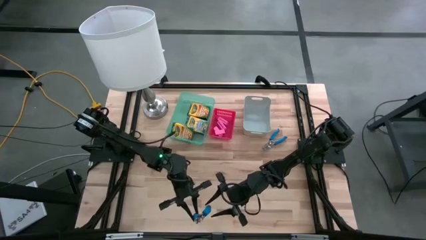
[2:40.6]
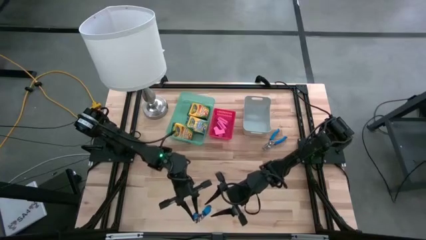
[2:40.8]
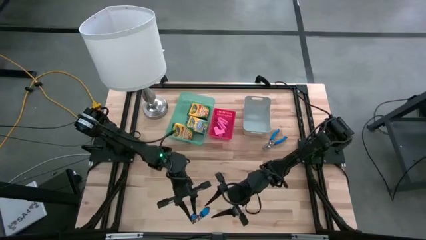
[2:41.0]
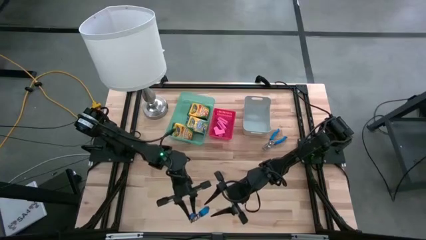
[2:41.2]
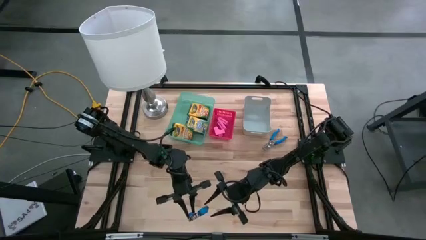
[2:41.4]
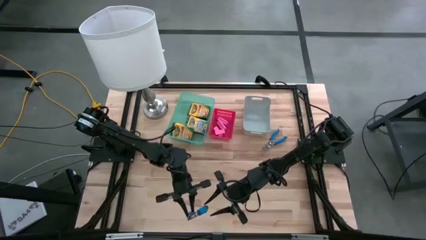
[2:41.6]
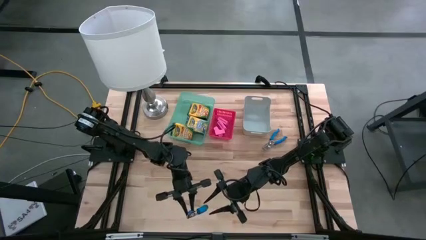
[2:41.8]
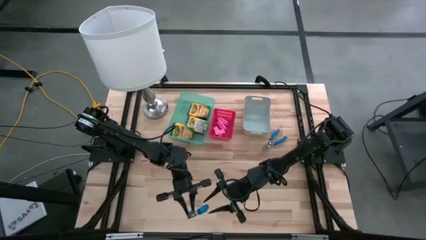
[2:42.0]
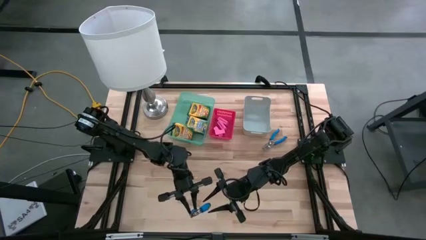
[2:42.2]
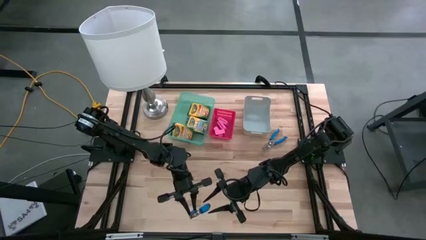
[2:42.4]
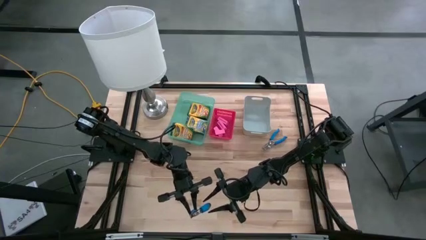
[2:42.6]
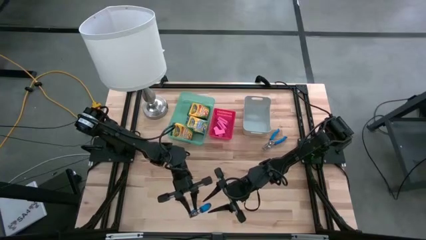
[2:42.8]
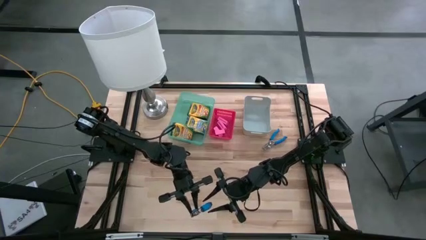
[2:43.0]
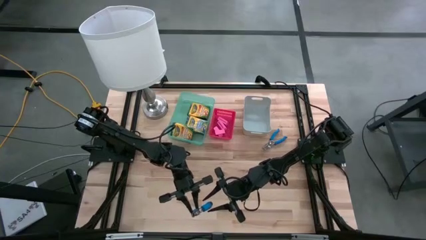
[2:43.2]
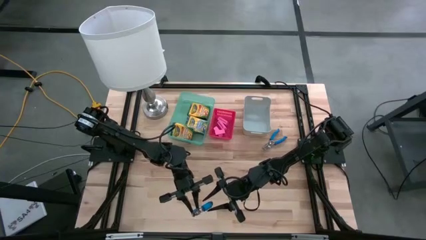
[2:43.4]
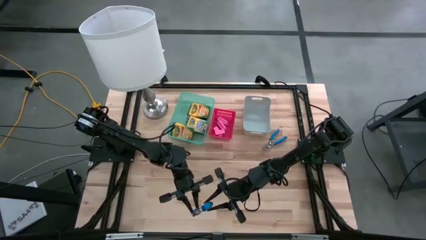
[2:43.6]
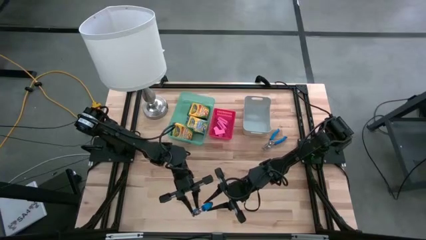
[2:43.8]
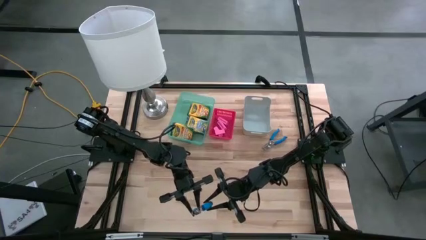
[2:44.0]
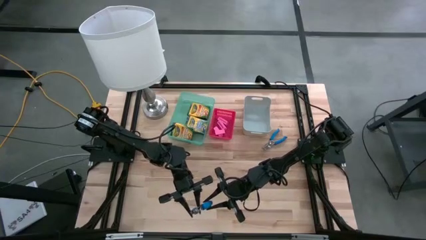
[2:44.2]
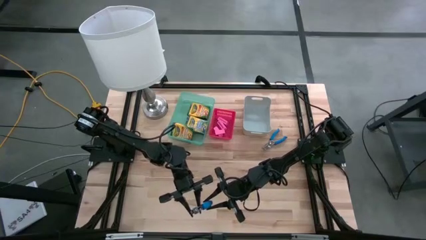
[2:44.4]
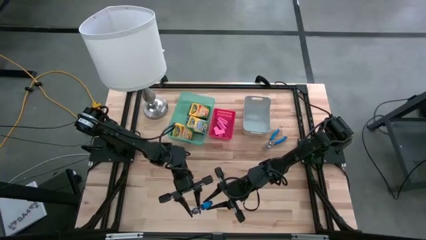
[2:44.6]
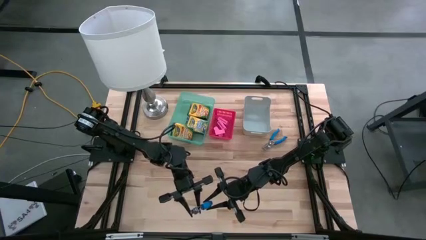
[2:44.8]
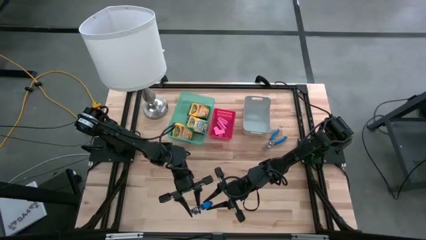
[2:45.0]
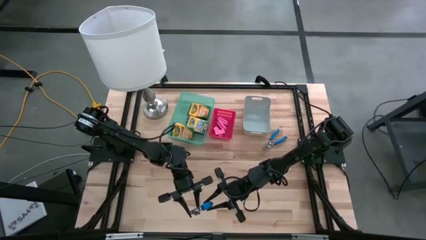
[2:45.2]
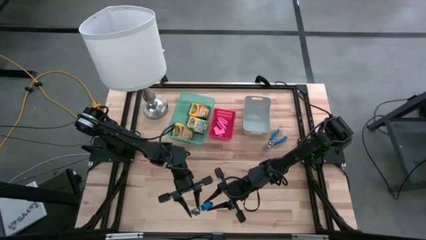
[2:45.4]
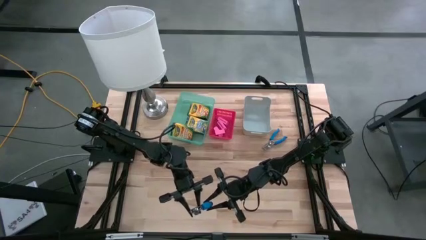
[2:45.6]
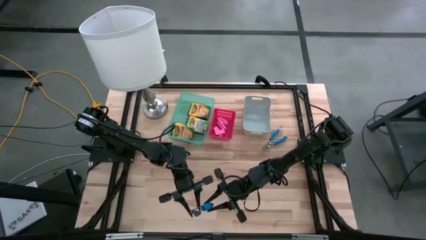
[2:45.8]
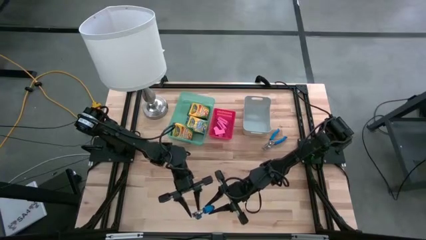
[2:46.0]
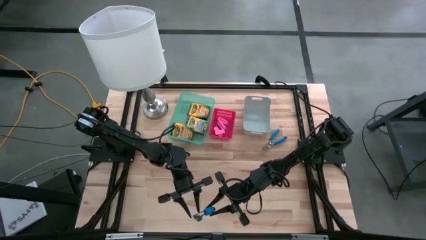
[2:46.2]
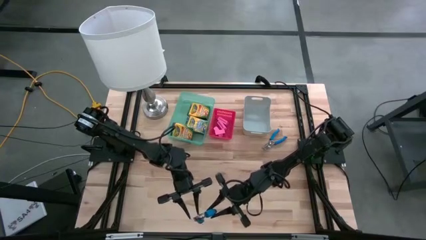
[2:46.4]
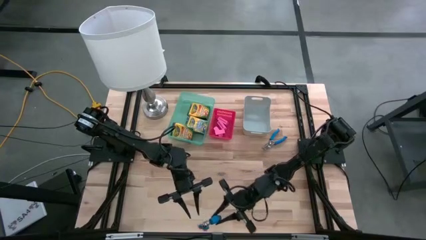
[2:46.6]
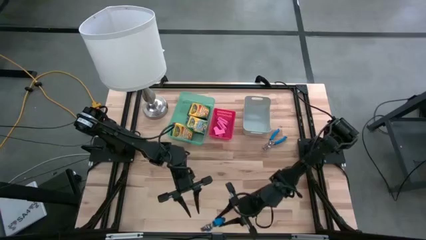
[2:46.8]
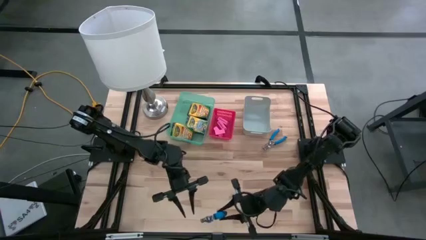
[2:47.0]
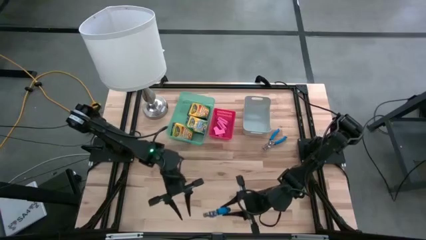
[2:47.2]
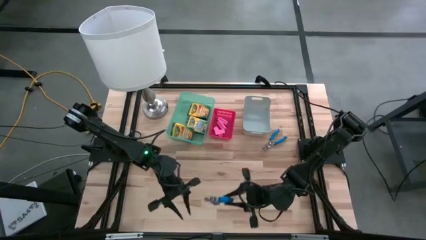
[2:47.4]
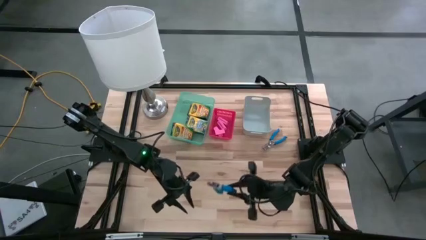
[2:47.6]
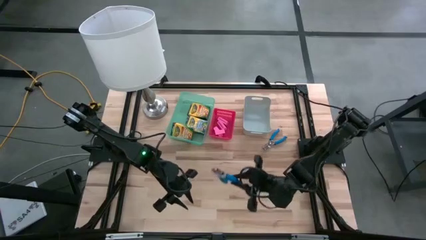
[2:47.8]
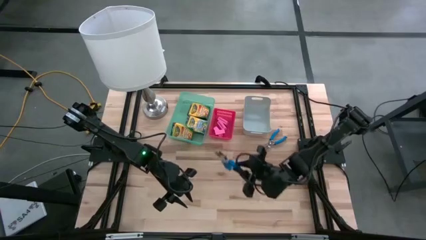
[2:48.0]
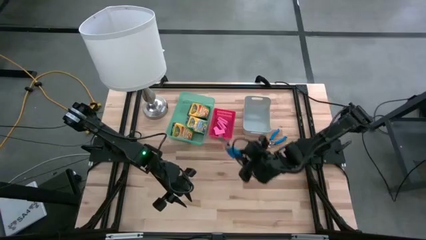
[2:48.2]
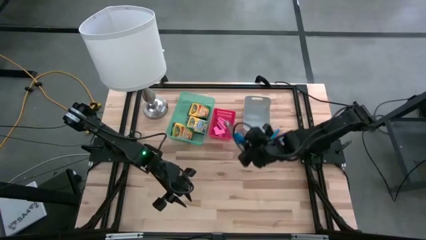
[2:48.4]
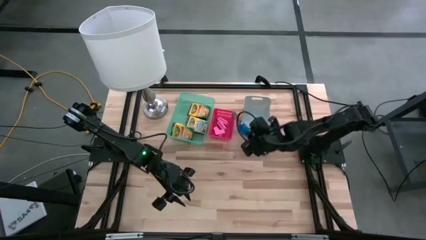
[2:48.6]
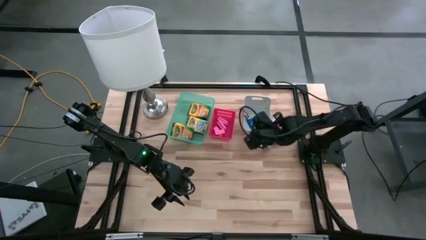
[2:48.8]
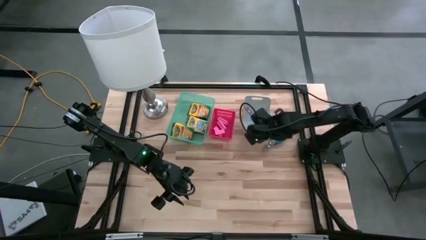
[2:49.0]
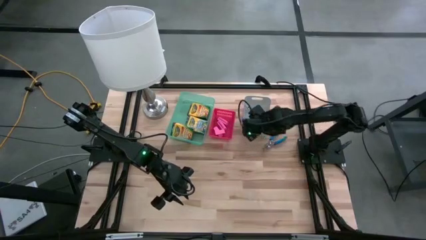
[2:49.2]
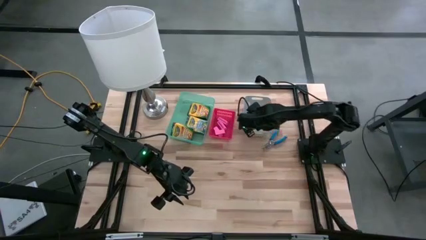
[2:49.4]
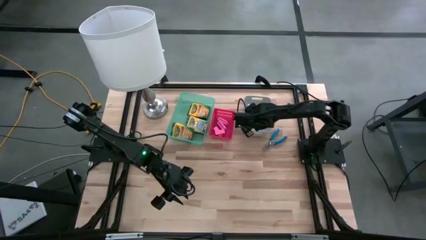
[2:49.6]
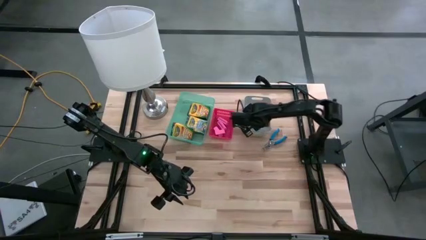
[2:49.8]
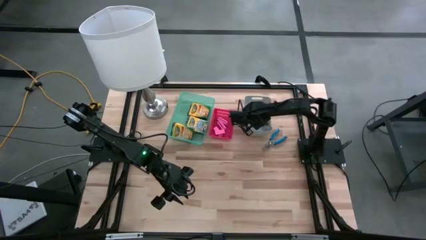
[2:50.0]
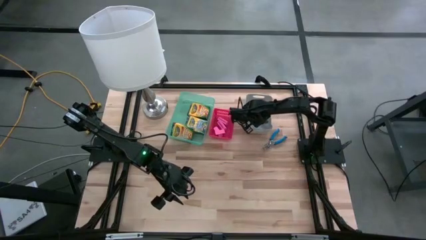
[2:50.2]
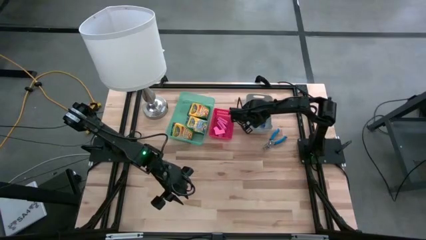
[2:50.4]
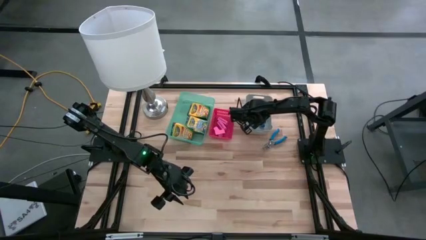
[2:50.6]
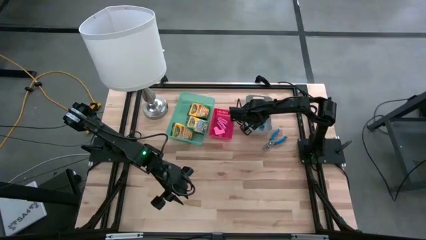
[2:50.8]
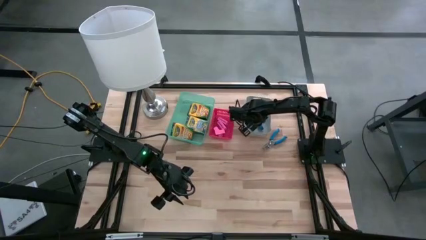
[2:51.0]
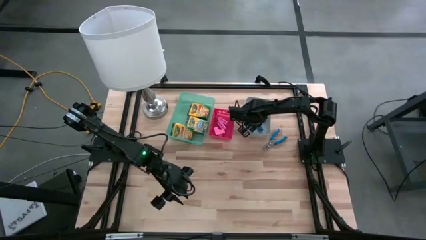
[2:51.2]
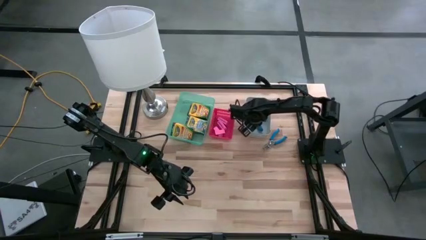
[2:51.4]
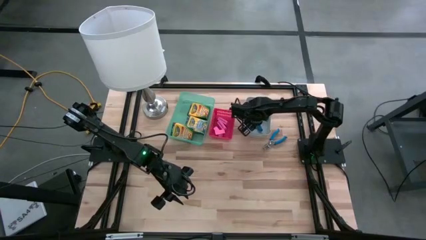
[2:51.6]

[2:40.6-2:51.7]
Task: Pick & Place School Supplies
Put the blue puncher into the gray bin

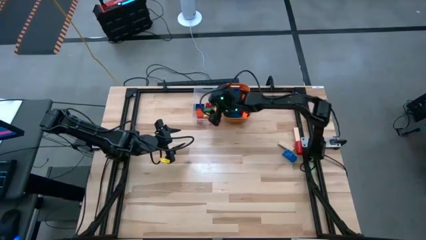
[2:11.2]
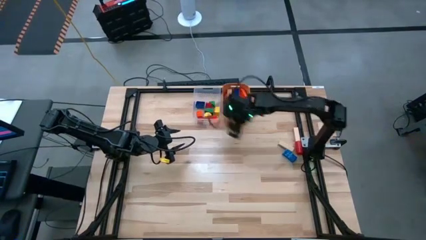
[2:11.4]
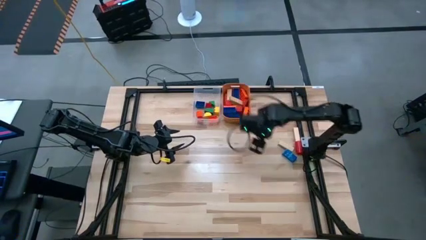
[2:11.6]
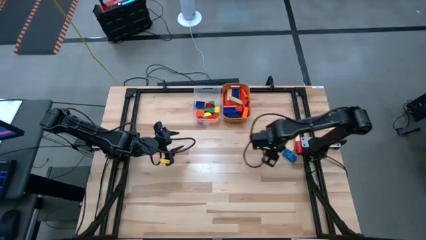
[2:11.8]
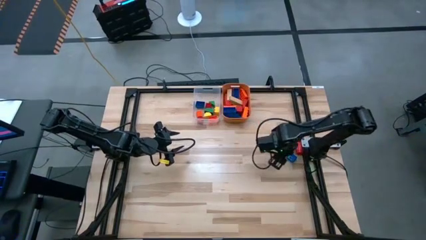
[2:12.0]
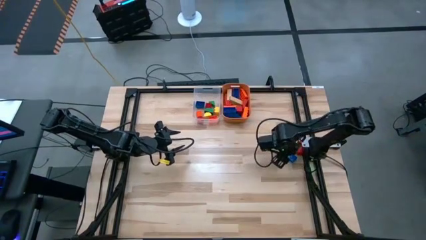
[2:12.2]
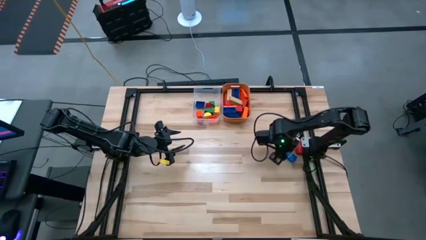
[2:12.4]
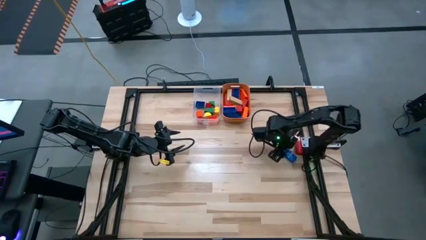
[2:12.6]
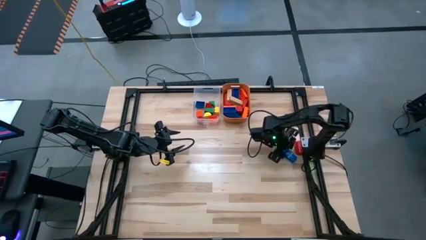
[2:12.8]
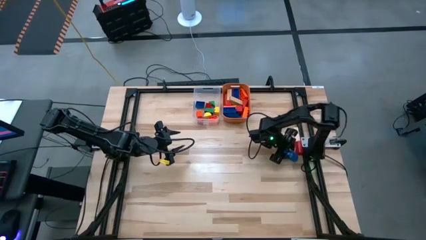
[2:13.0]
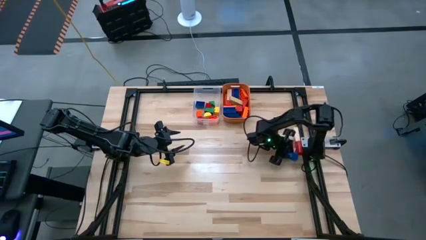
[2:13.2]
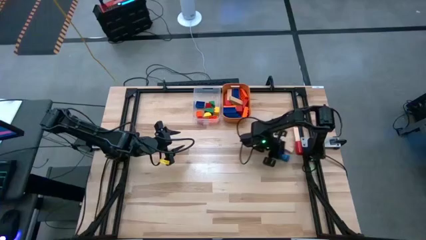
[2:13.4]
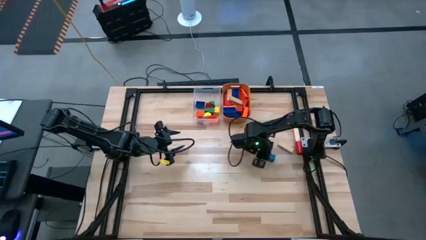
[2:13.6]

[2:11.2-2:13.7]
Task: Sort blocks by size
Put the blue rectangle game piece into the orange bin

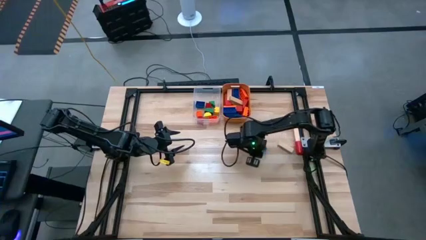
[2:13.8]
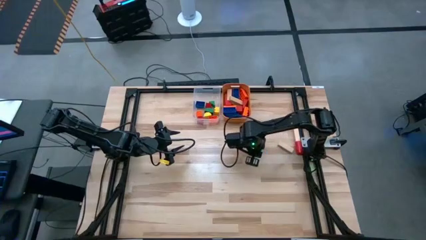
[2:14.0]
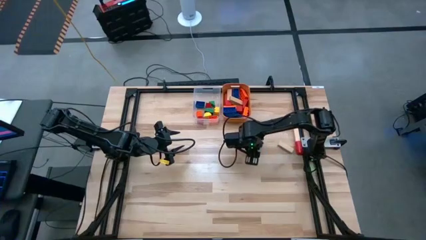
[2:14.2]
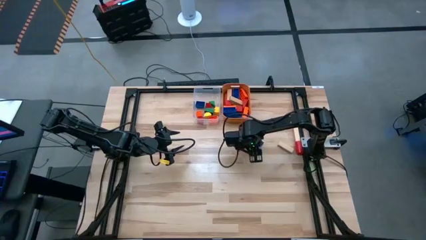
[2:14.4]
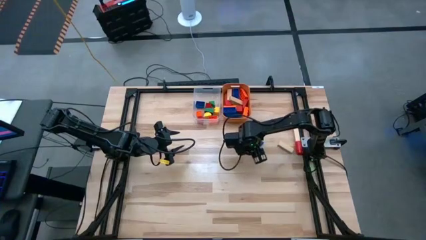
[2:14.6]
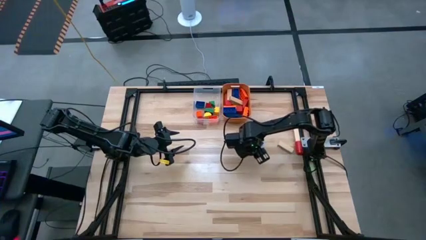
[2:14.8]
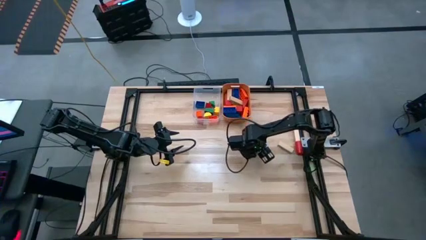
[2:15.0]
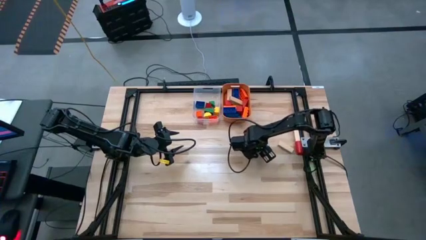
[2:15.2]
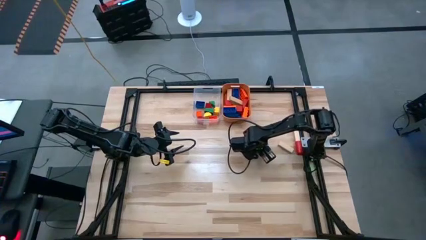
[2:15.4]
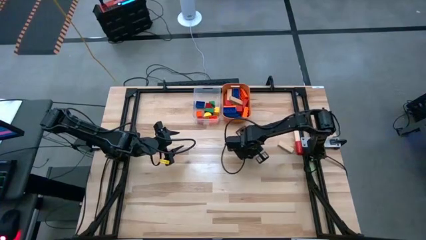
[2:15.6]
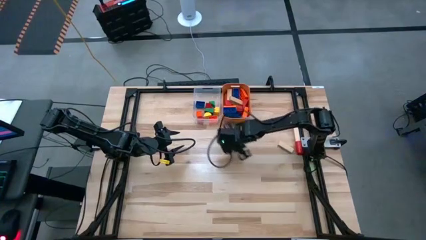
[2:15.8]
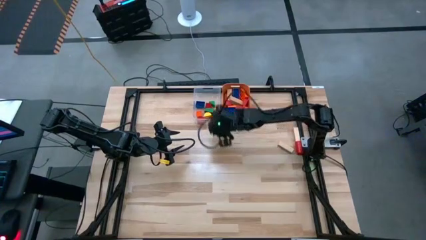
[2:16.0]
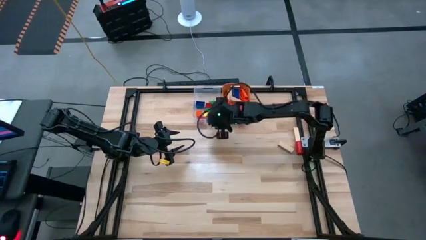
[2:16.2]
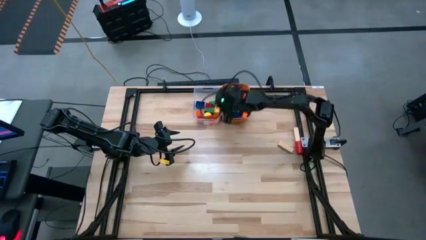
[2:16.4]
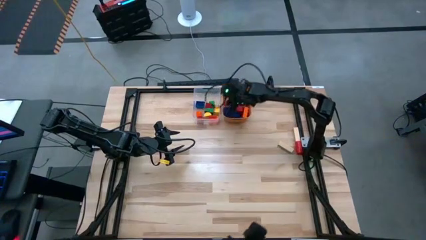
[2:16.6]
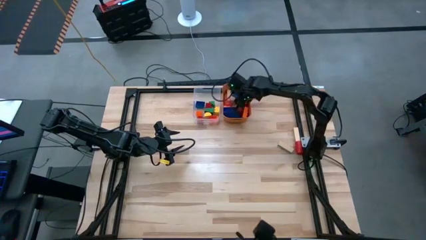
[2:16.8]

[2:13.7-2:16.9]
Put the blue rectangle game piece into the orange bin

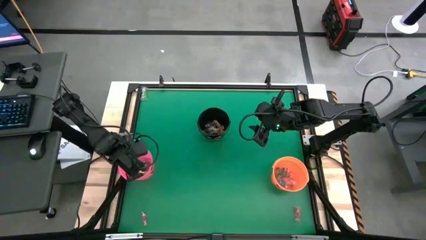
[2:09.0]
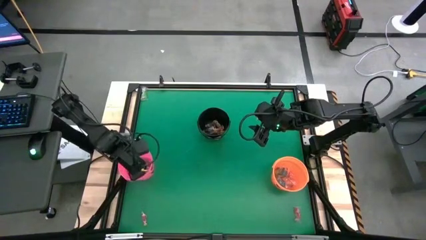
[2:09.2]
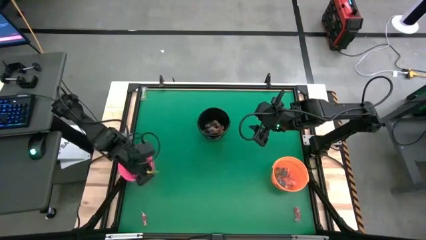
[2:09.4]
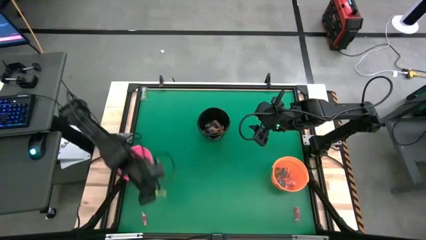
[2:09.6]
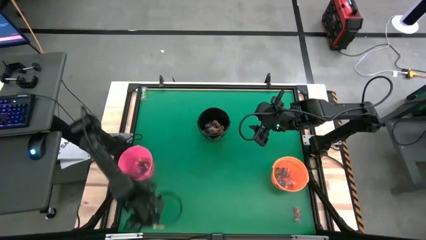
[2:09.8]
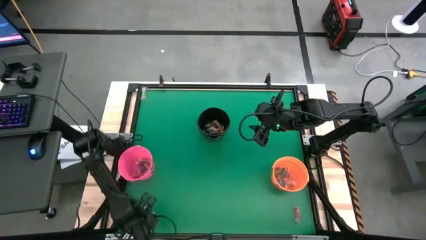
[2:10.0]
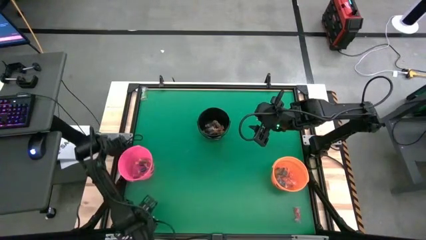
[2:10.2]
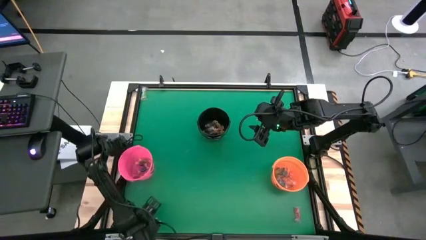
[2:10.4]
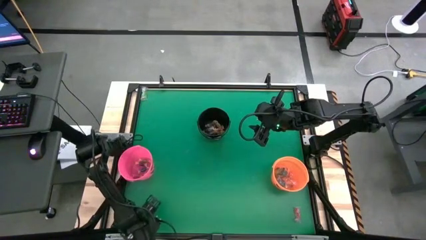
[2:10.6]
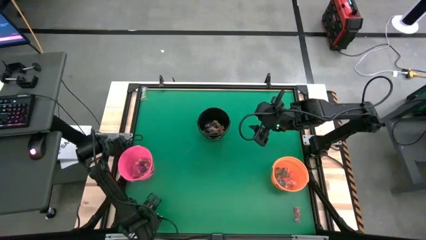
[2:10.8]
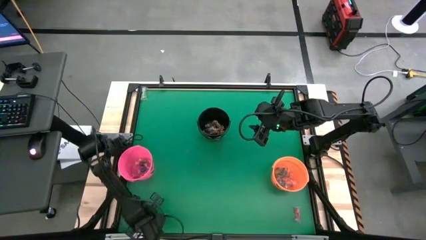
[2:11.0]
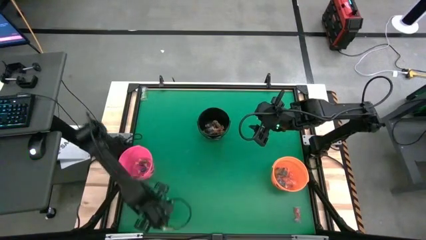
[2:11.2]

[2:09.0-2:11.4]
Task: Sort candy by brand, put in halloween buckets
Put the red candy into the pink bucket
